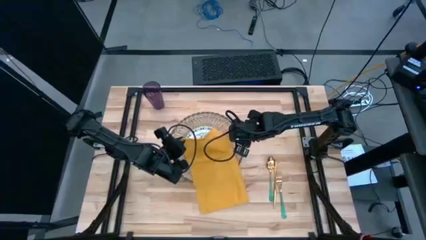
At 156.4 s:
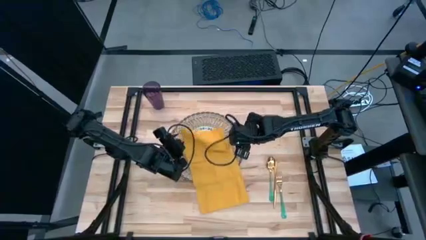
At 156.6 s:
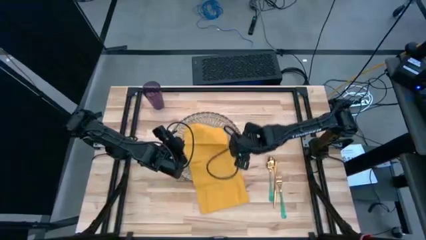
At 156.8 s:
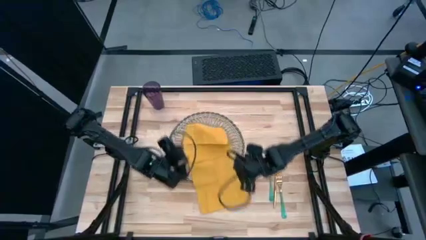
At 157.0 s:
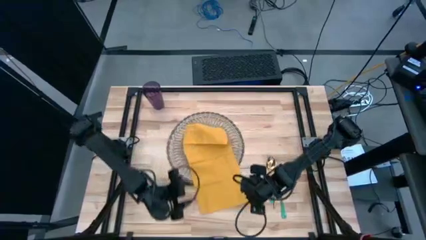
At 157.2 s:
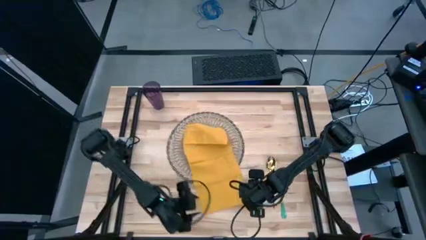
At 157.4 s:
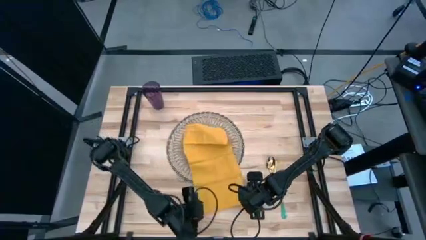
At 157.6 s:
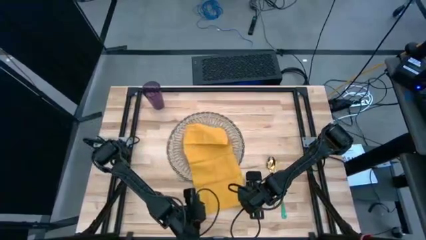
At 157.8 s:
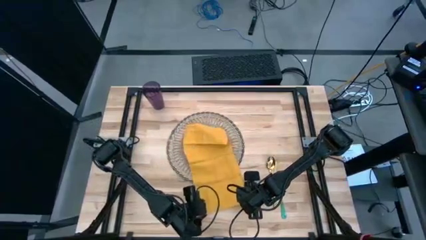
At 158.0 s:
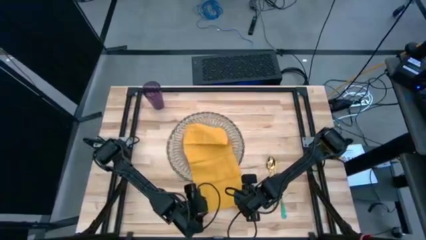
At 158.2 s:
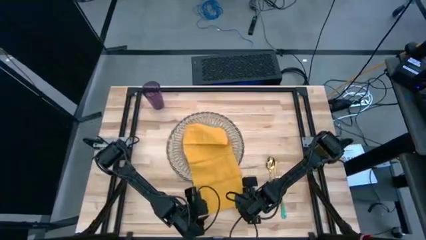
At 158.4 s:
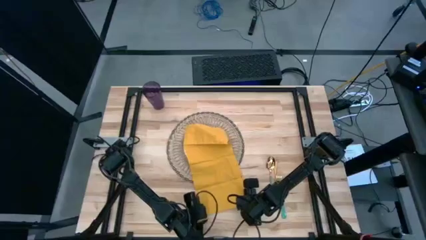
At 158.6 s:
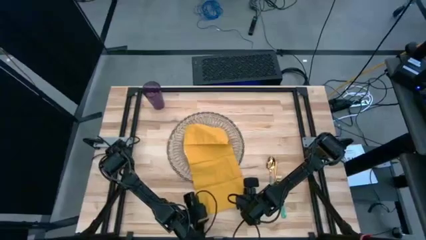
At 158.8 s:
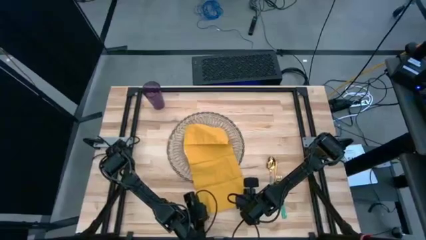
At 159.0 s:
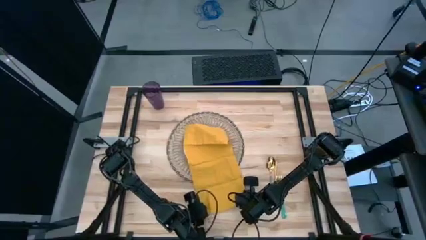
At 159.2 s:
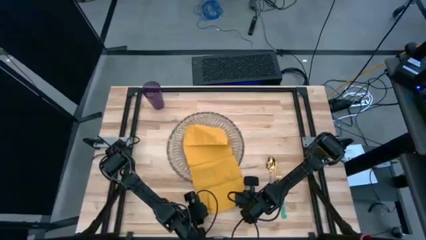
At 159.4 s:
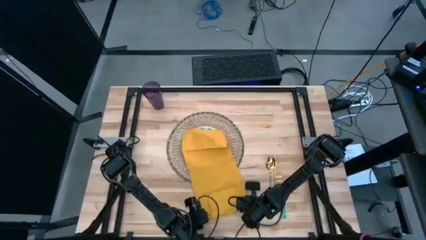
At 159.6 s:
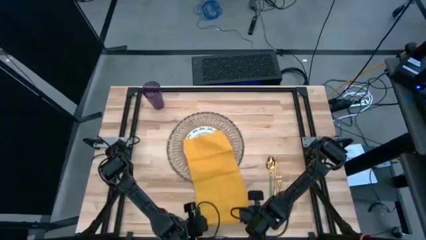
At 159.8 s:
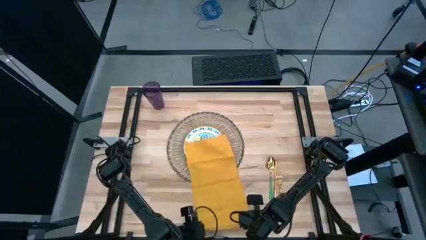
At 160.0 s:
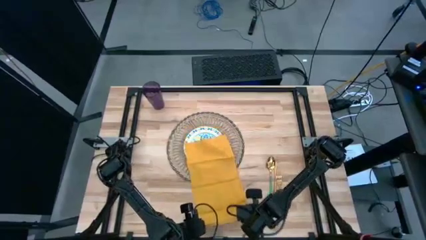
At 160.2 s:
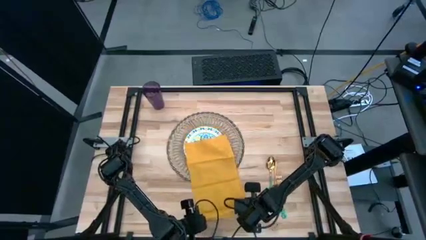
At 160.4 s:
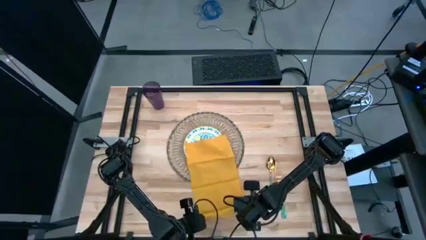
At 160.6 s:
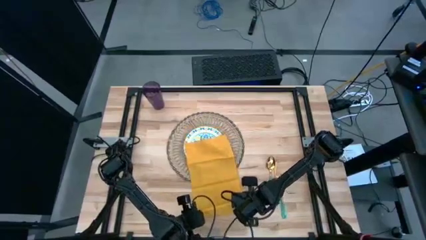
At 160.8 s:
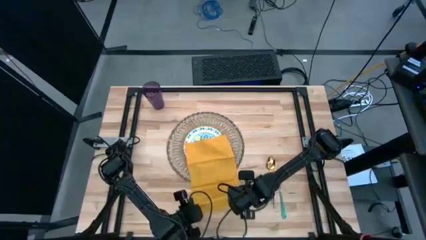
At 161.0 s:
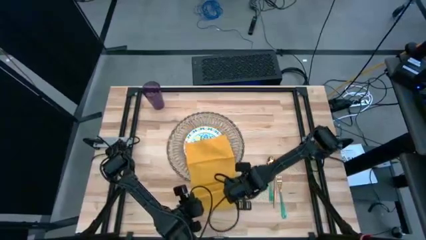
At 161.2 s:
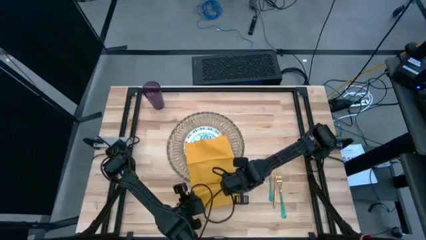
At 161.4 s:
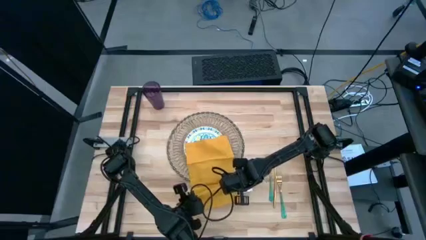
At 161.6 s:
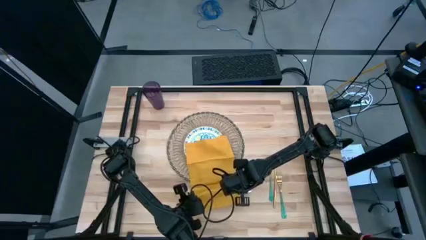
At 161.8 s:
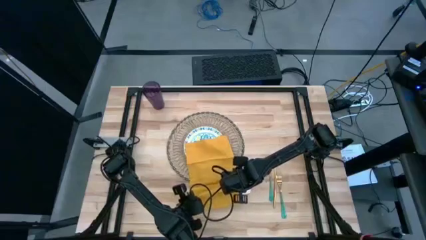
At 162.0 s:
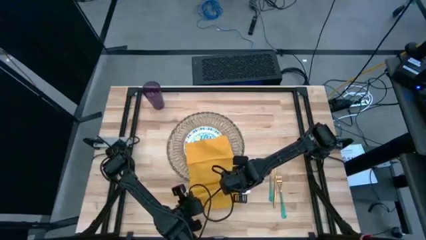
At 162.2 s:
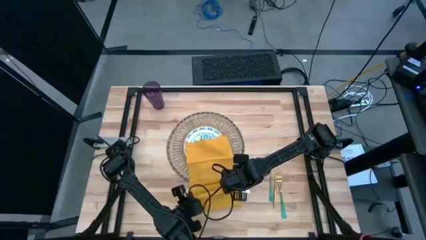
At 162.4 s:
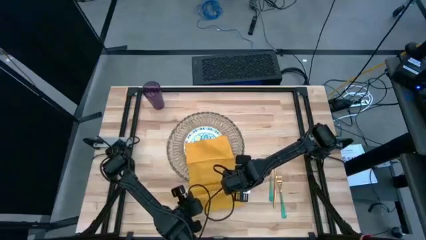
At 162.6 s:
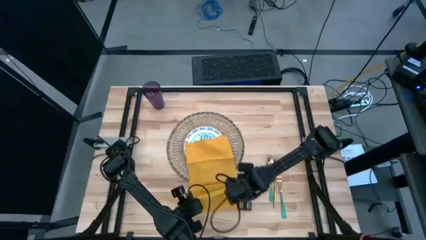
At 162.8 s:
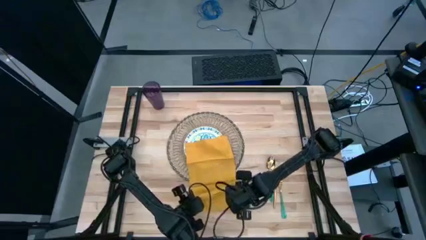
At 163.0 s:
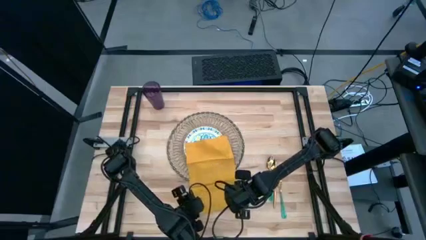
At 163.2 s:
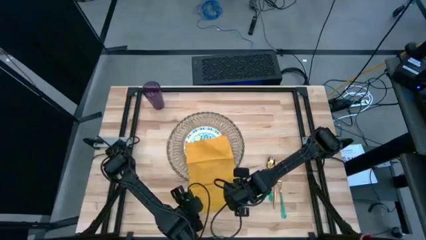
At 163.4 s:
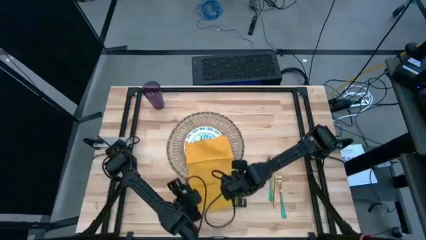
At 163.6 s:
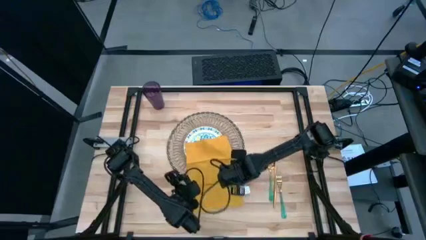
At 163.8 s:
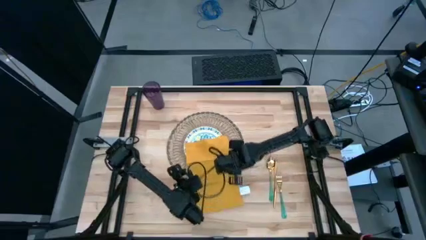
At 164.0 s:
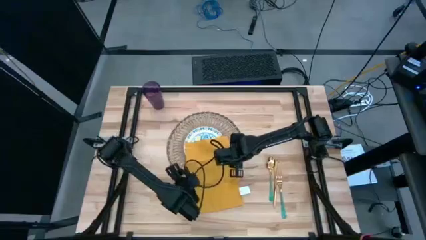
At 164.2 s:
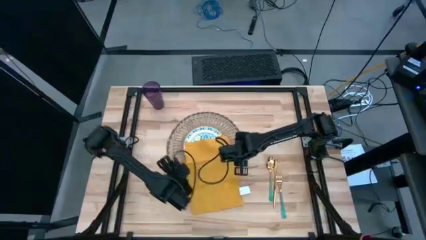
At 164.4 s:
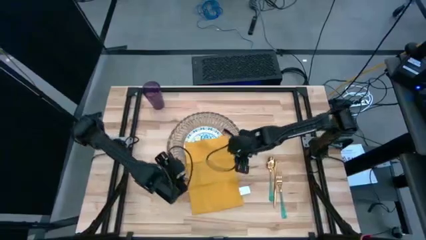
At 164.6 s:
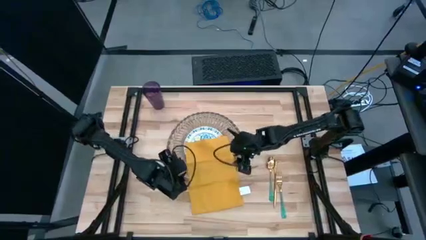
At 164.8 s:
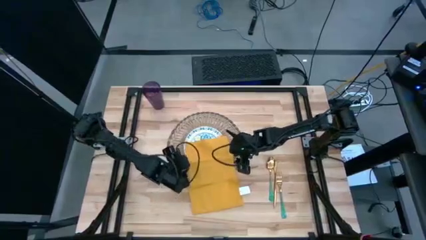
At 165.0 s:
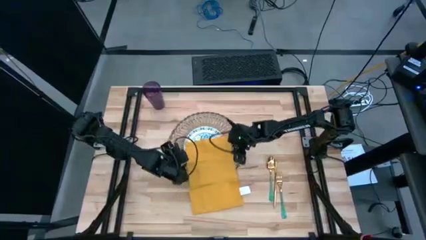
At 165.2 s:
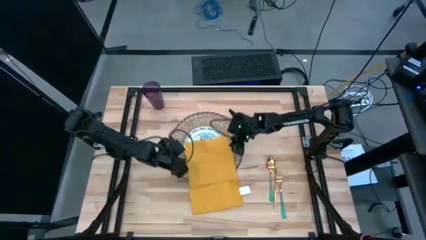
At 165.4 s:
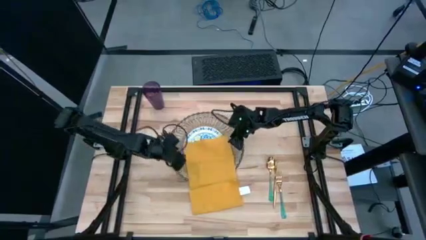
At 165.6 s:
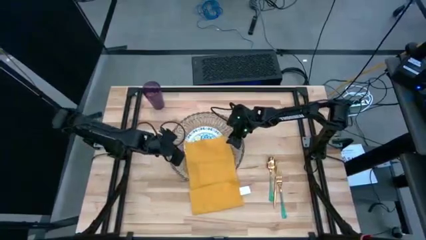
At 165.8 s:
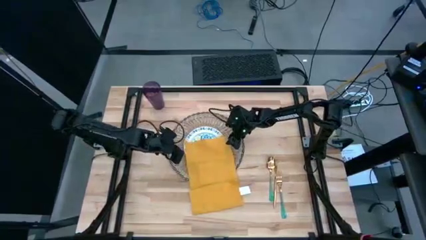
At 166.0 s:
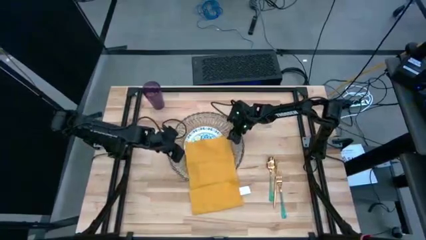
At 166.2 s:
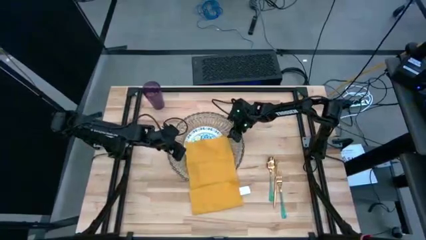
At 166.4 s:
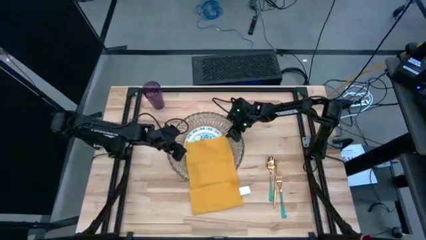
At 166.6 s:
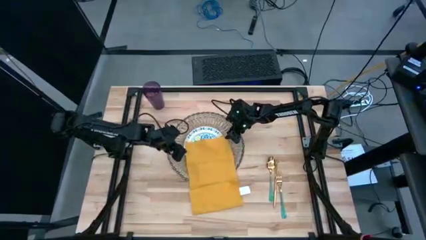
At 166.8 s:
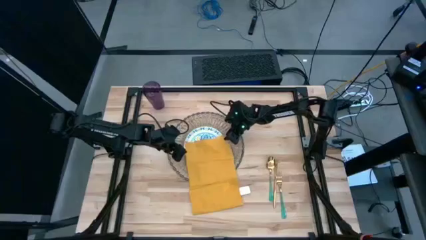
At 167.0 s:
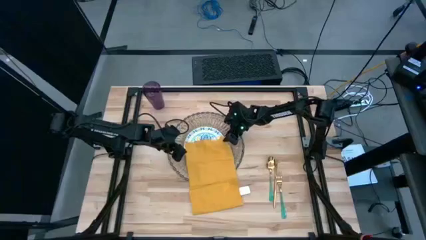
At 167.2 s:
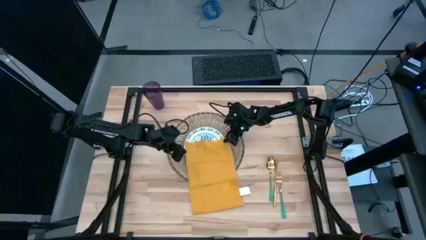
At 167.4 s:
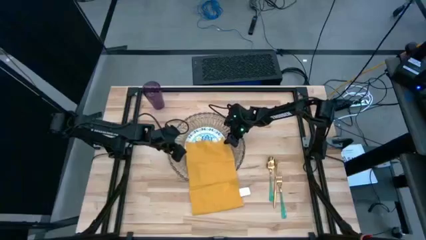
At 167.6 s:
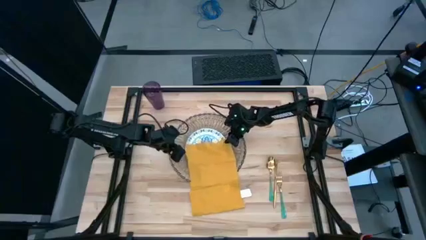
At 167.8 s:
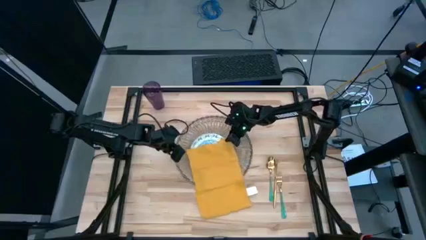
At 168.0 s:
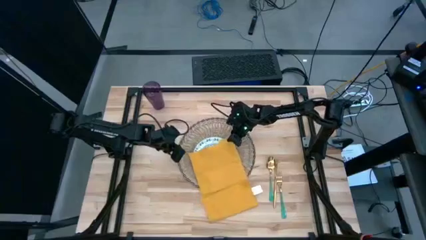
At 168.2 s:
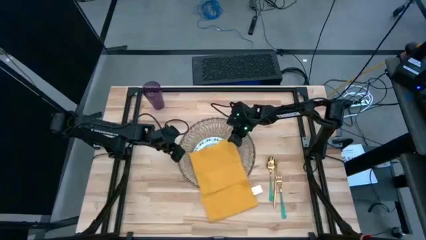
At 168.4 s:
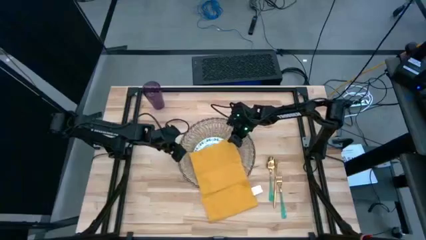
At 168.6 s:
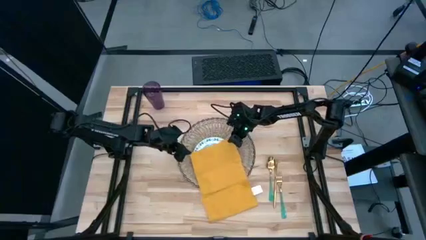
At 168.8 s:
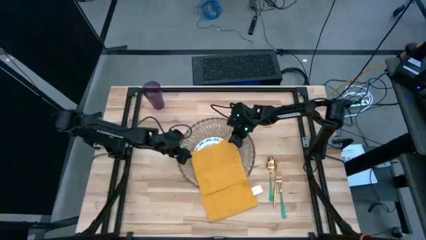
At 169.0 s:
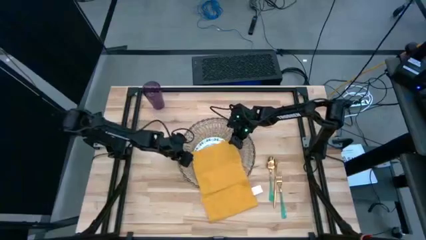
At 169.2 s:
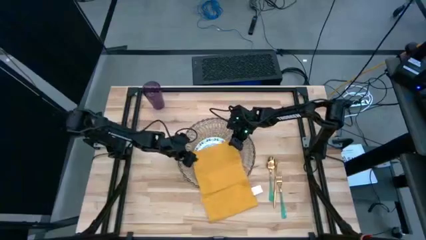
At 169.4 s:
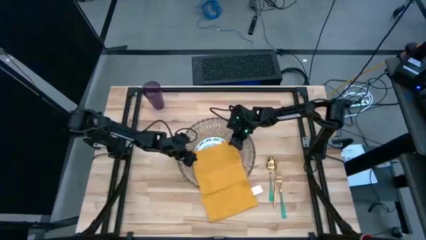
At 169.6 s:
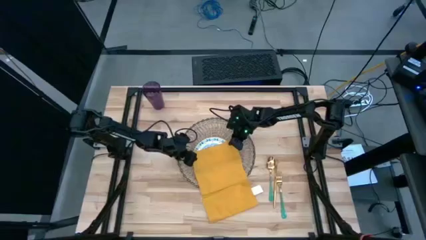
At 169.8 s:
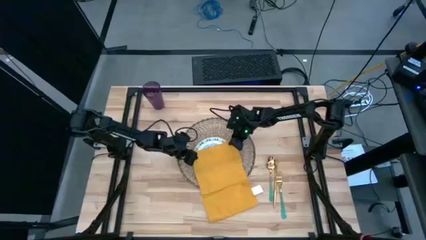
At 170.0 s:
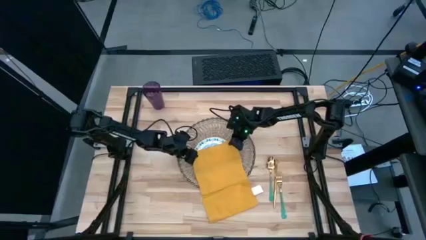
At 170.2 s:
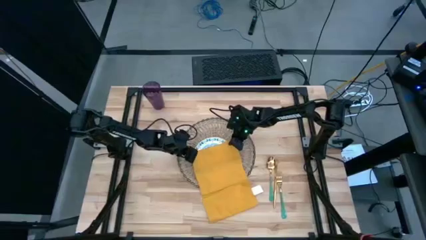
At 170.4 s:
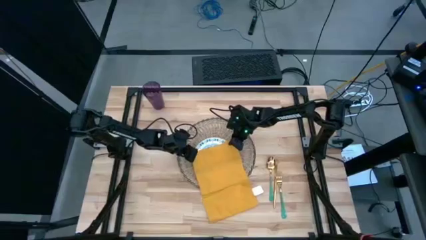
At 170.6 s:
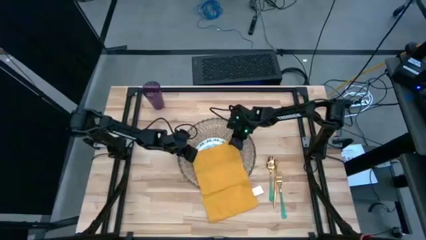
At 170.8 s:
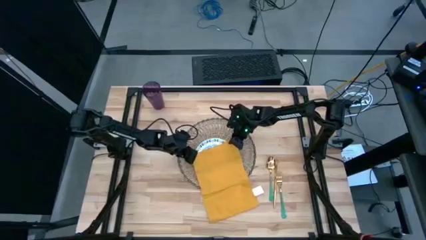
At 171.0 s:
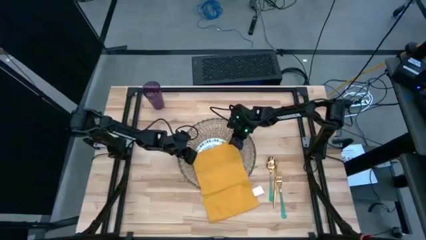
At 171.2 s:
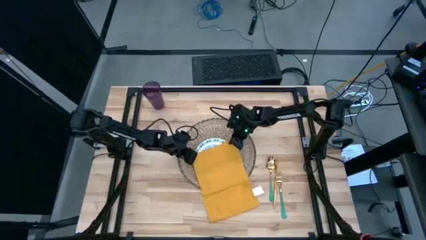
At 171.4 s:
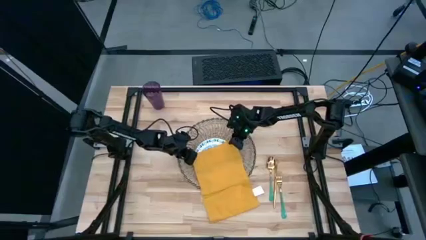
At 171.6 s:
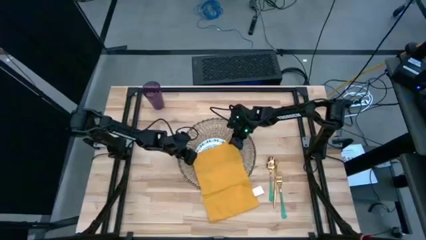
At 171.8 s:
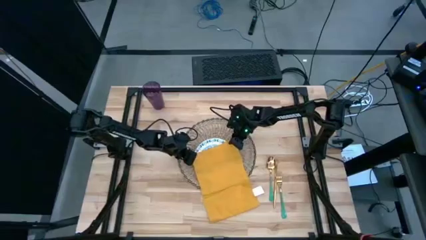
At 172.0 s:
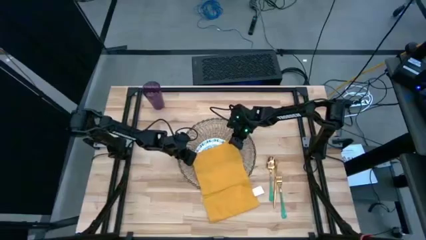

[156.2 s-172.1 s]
Task: Set table place
Fold the yellow table napkin

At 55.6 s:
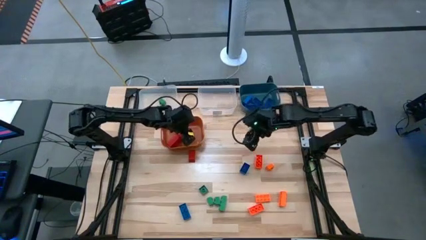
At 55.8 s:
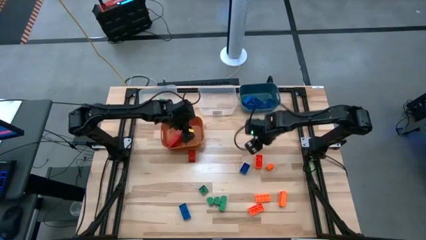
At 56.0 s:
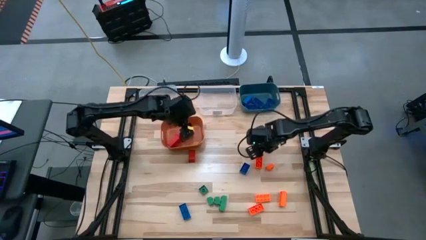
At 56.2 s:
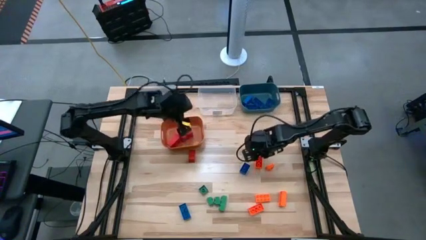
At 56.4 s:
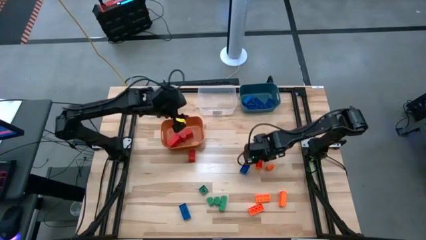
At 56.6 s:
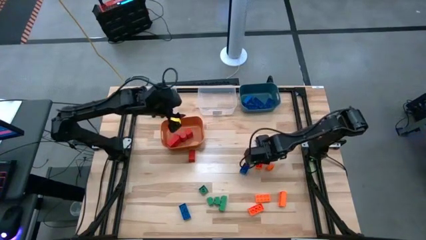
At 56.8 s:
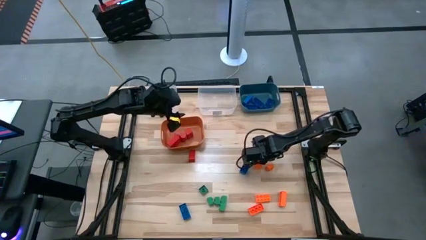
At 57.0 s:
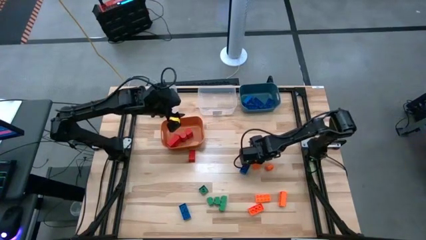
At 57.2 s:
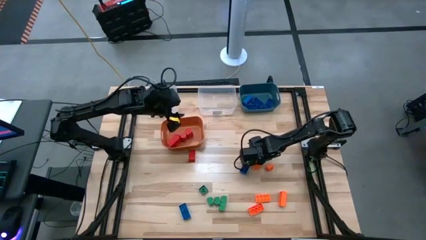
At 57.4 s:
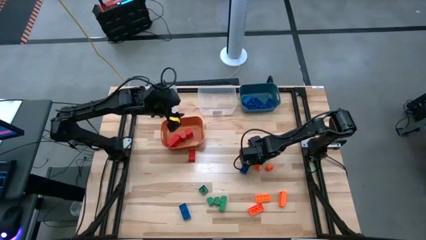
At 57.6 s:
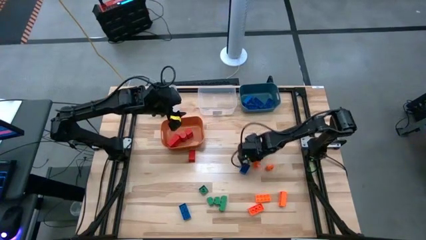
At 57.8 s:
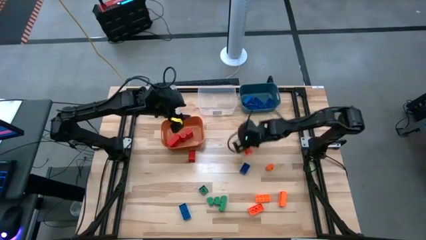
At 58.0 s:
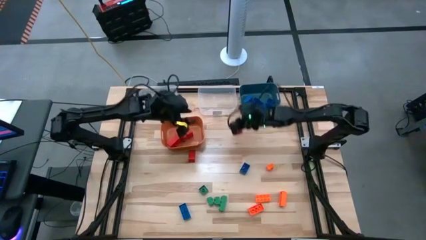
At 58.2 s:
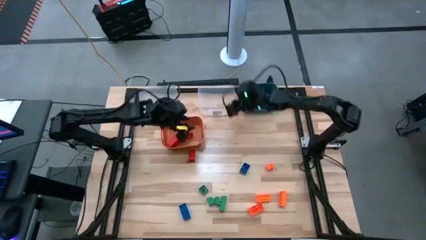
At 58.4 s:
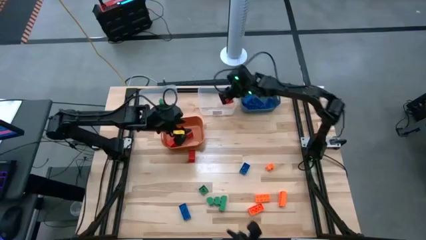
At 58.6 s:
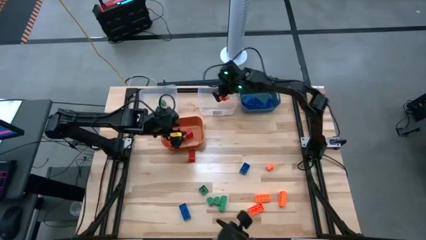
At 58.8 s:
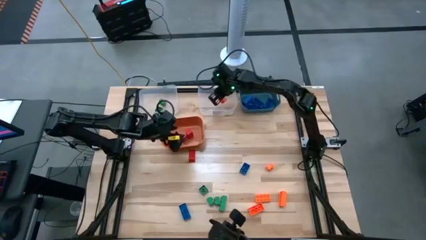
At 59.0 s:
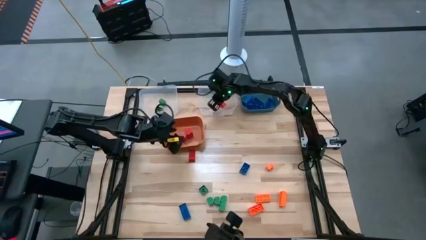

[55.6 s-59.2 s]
Task: Sort blocks
Put the orange game piece into the right transparent bin
